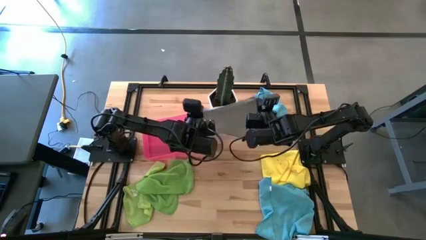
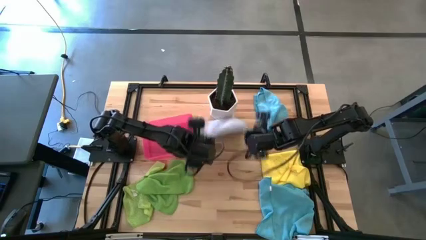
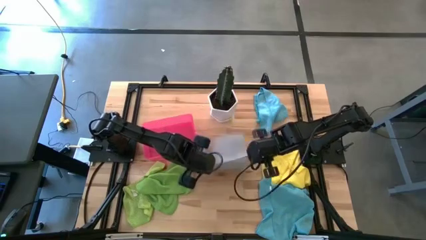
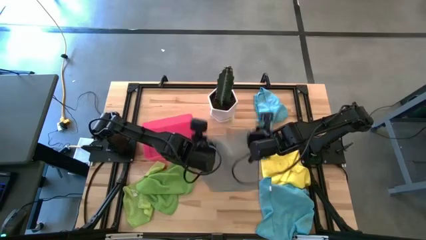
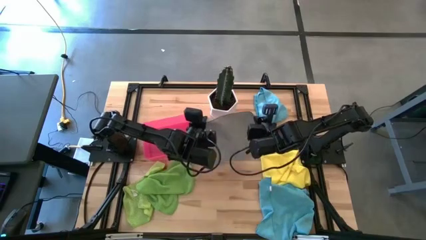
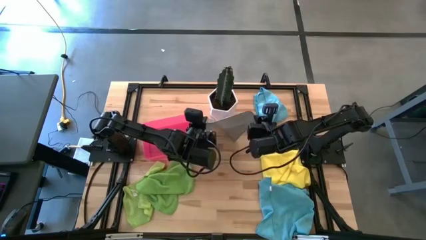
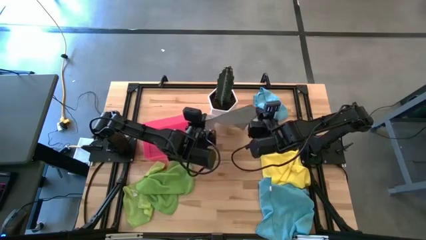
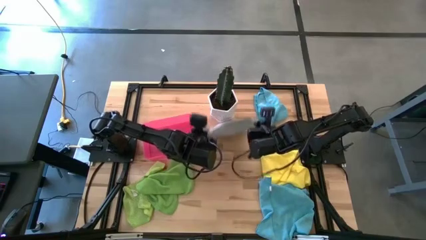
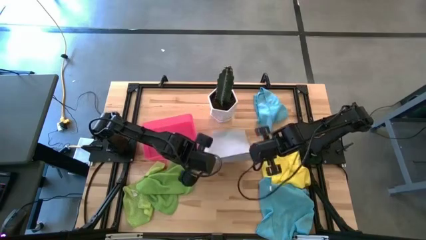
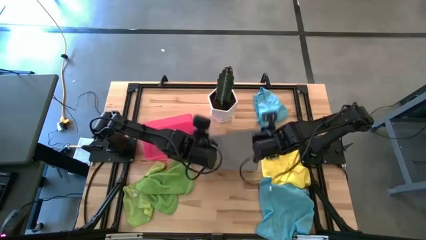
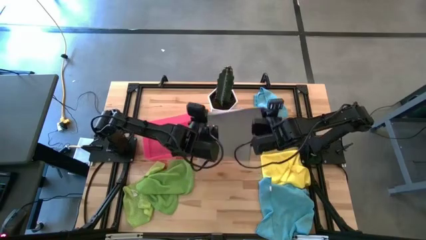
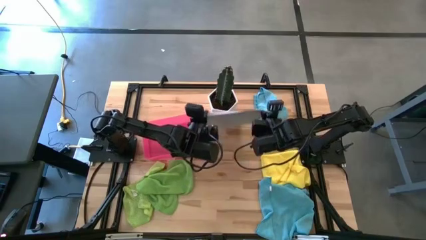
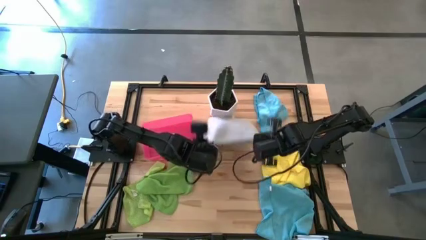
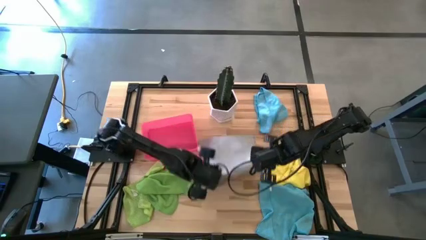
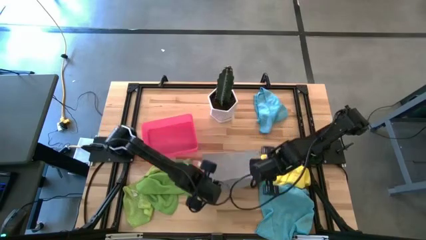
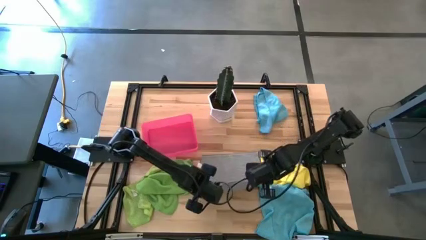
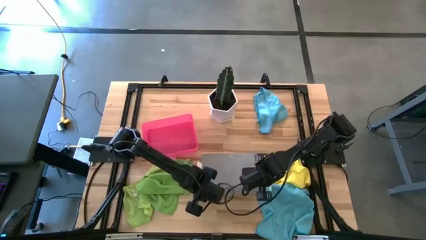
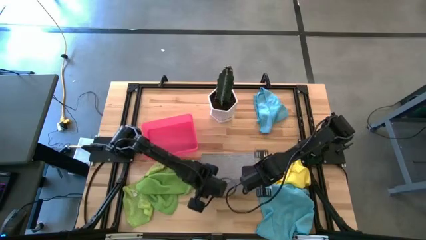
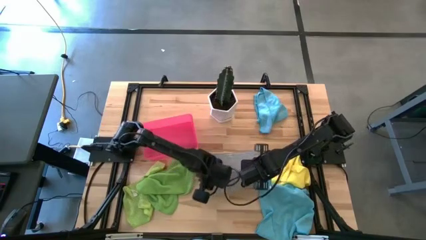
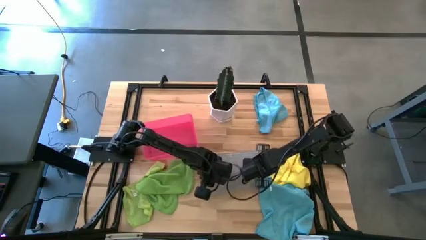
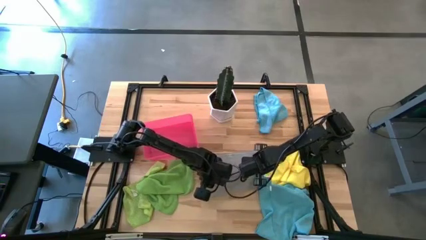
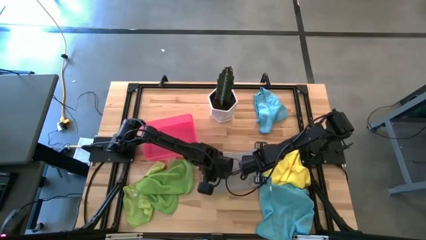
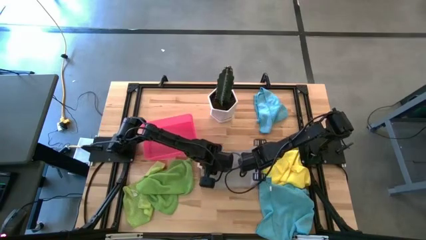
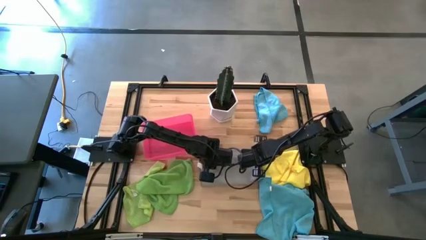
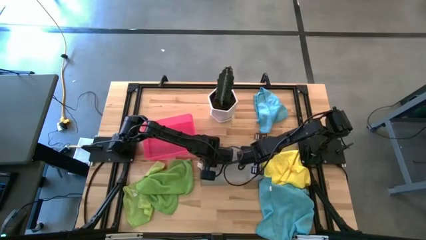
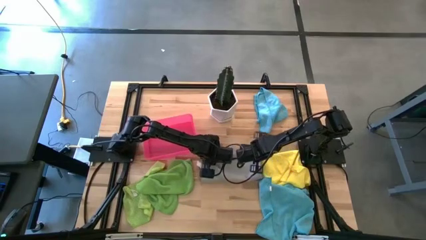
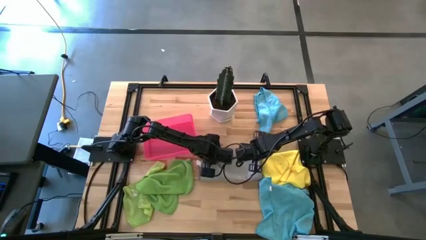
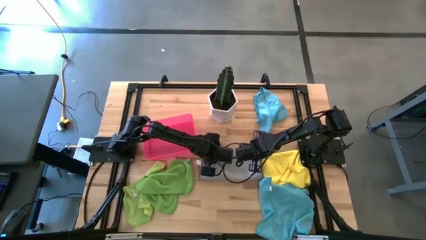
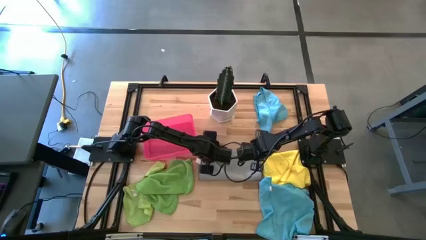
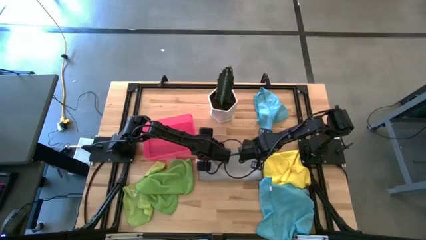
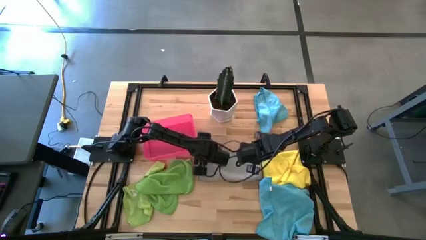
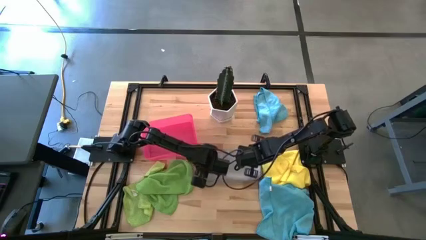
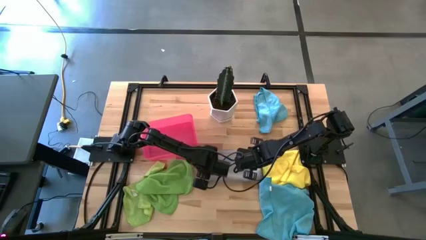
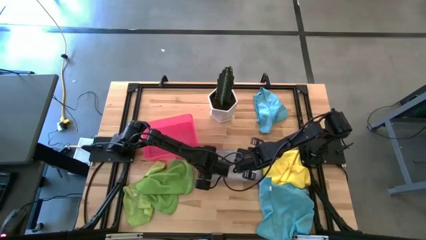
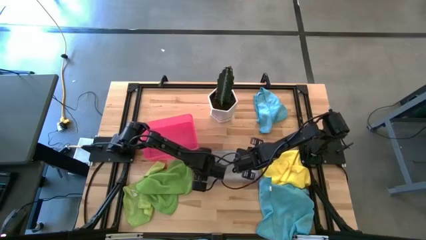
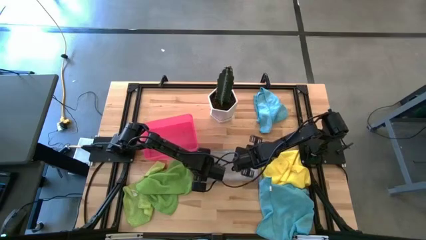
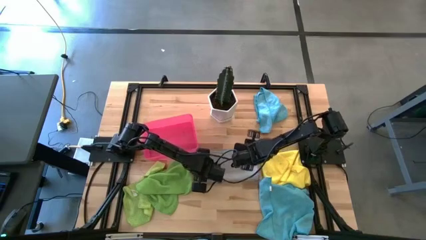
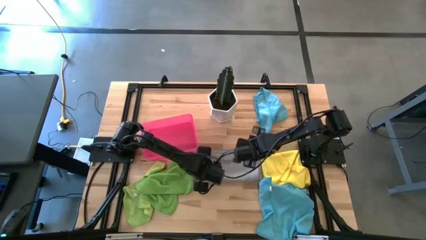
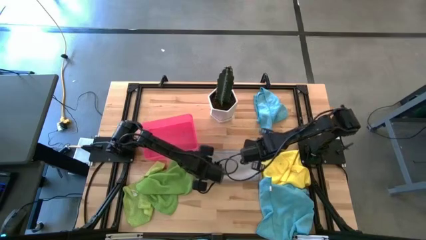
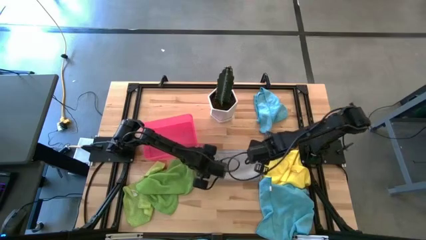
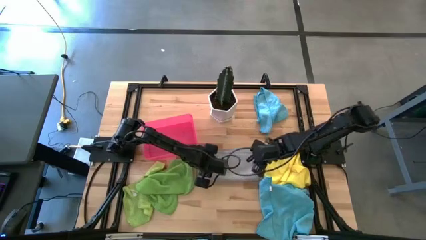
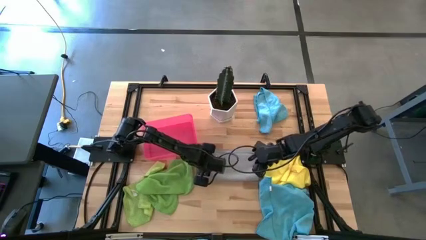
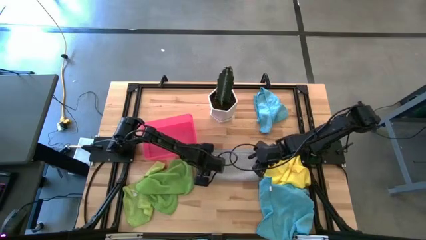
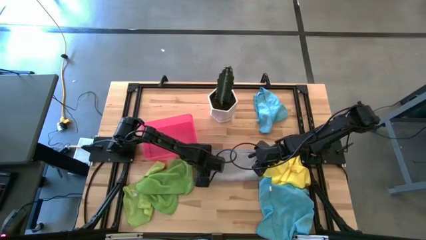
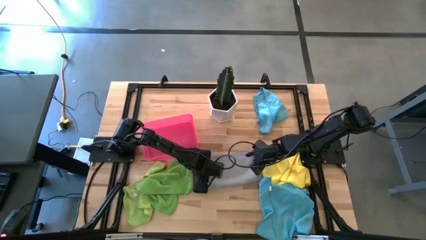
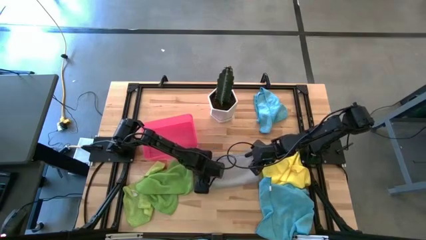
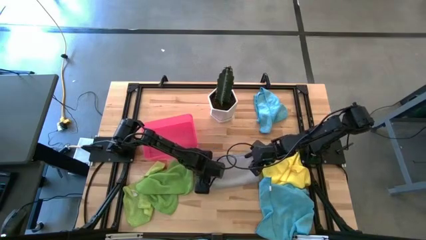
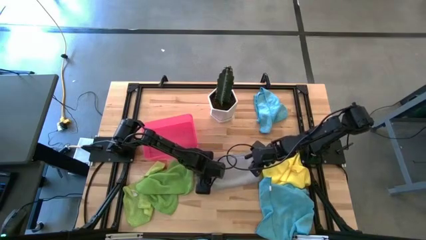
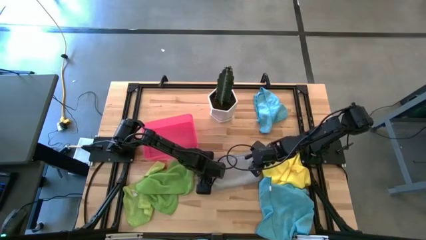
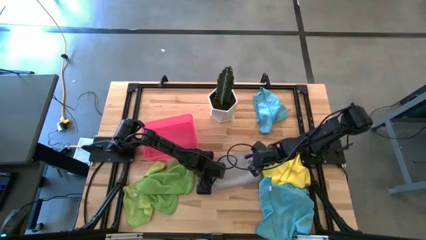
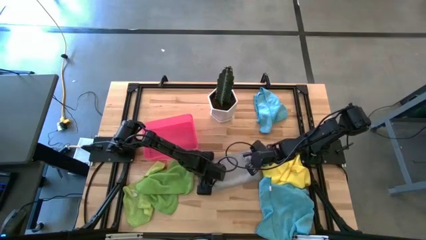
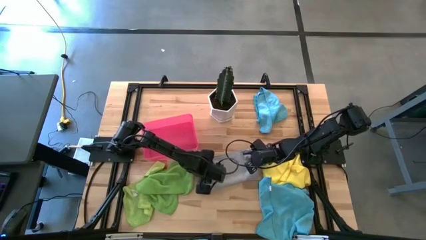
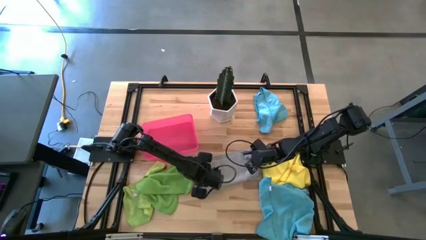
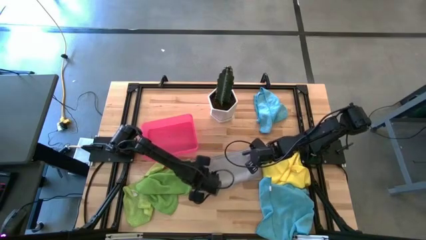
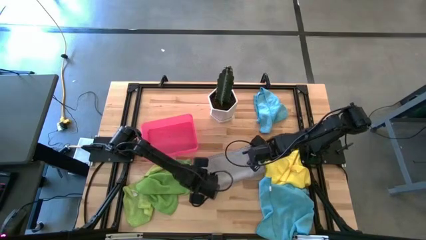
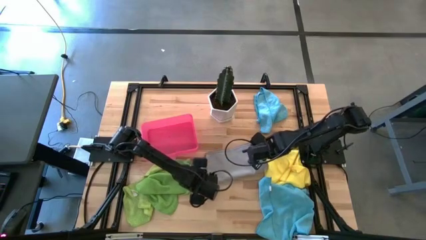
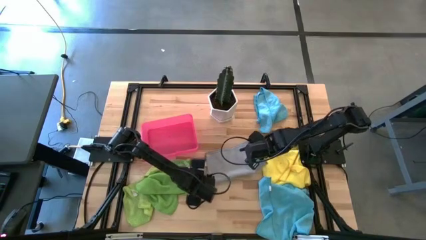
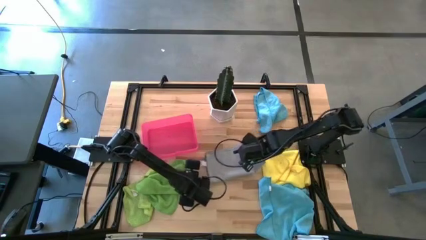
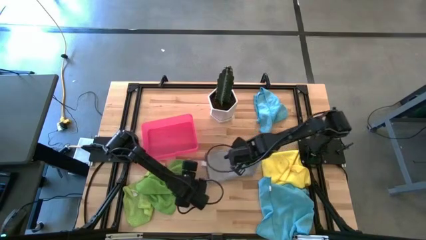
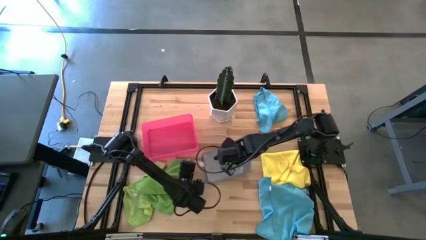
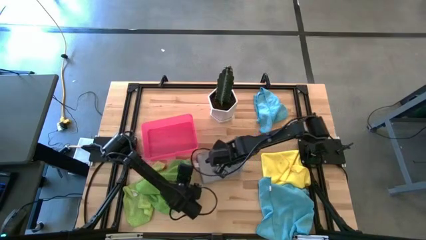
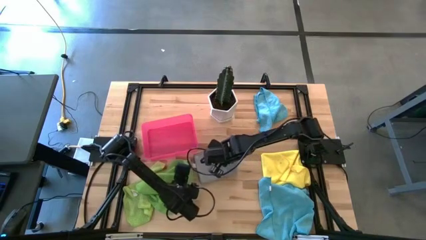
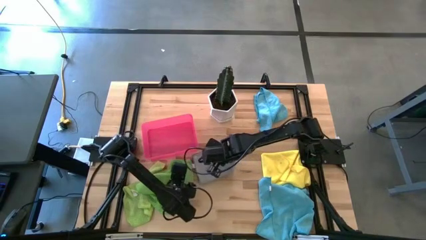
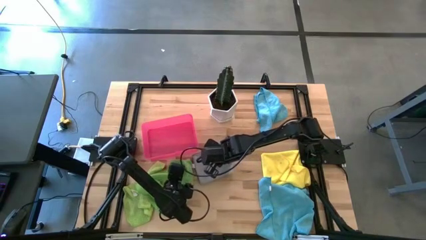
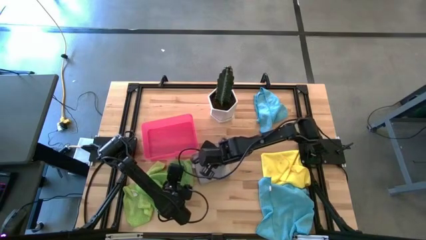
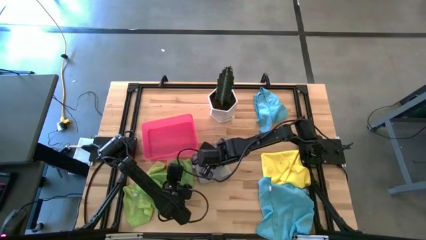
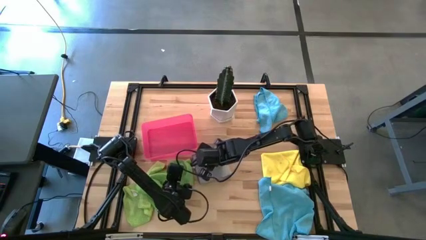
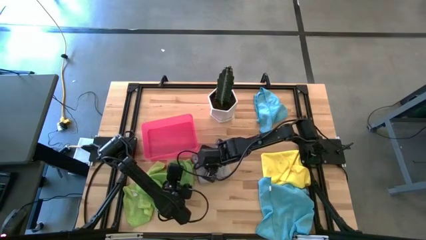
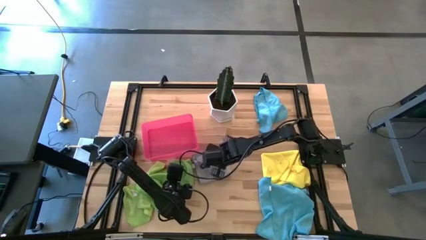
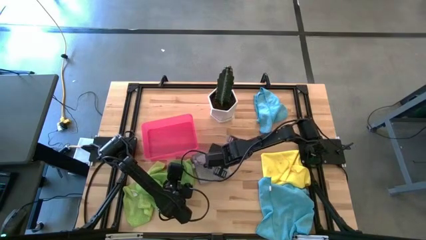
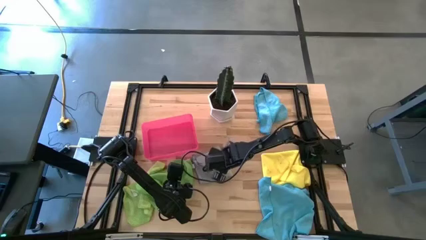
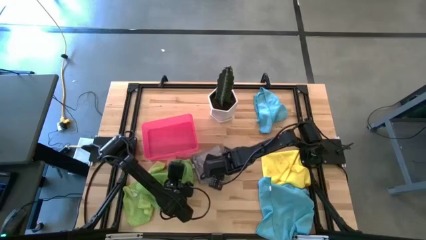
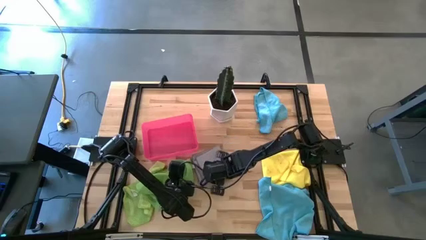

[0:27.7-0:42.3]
Task: Fold microfiber towels
Fold the gray microfiber cloth

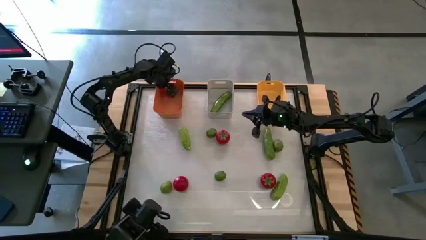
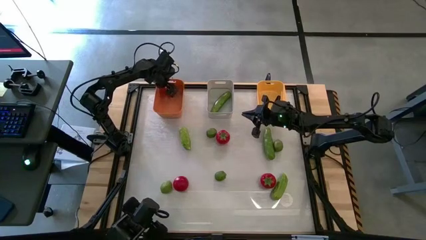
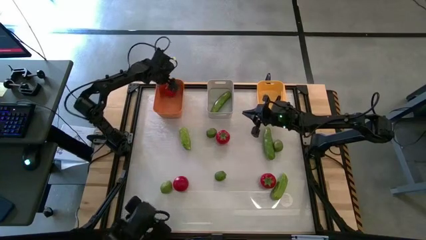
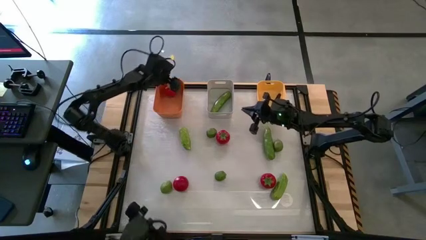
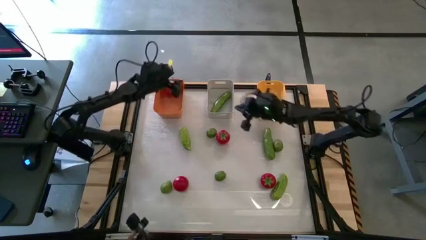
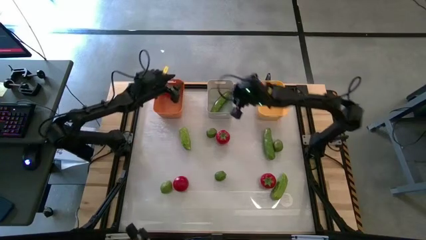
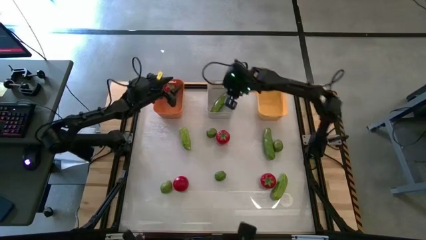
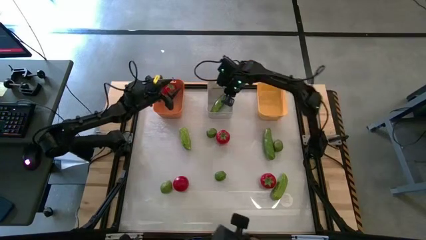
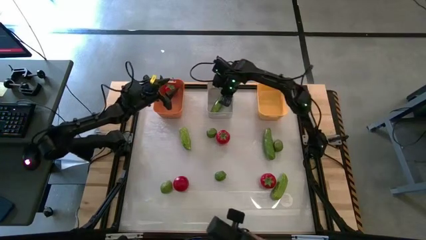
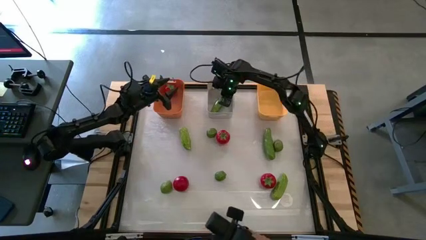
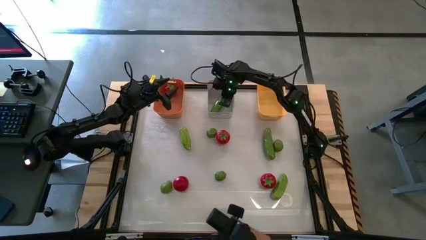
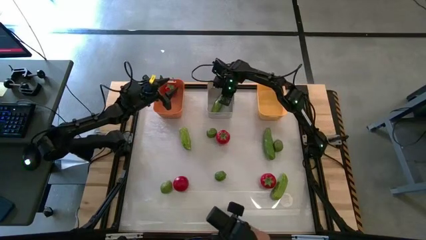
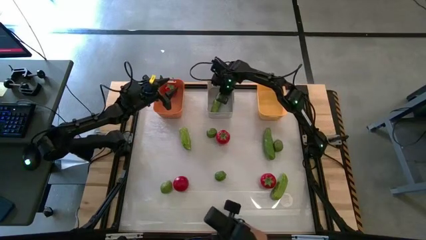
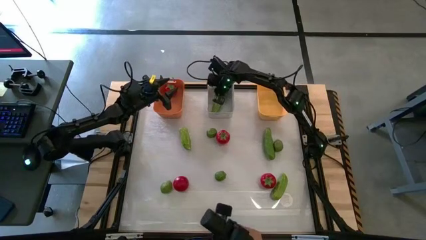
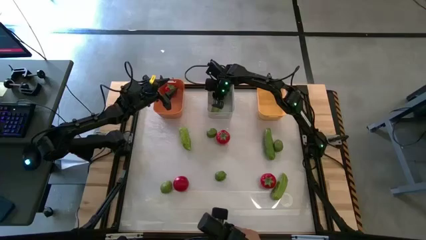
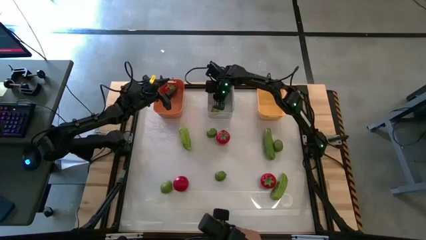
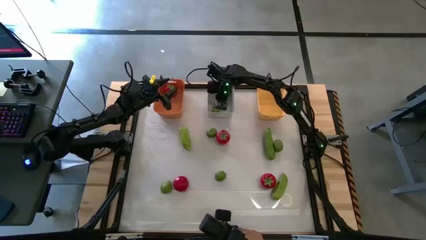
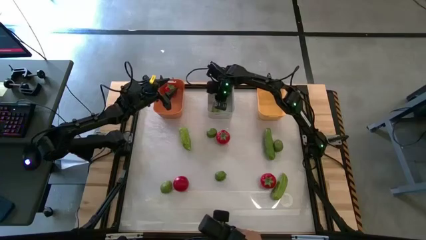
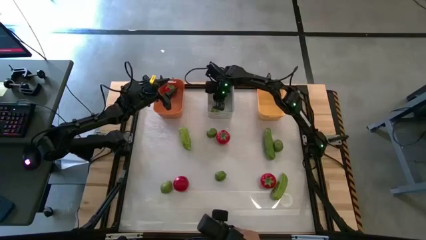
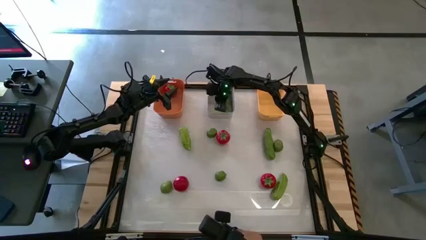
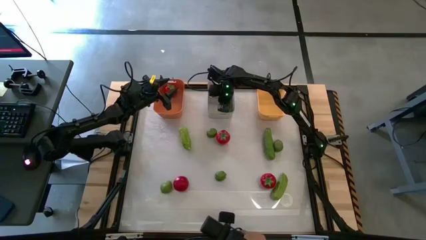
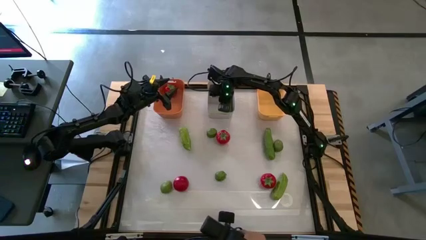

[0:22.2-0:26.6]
Task: Sort produce into baskets
Adjust the cucumber in the gray bin
